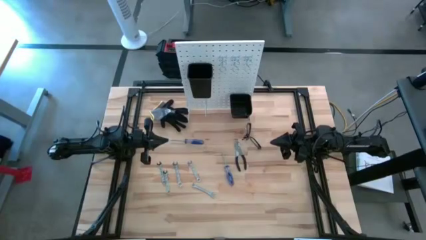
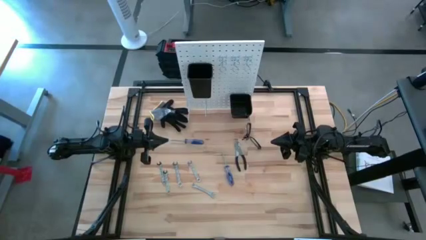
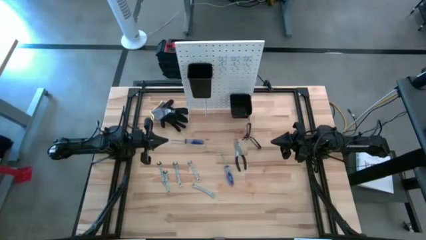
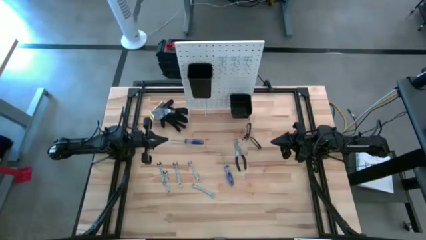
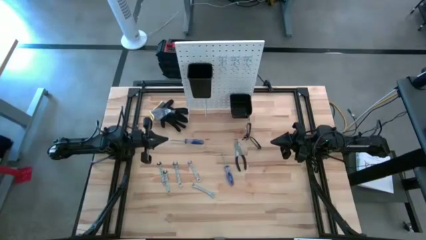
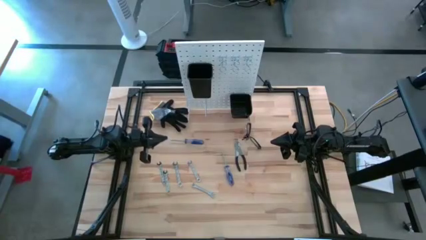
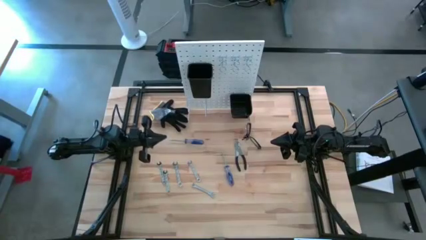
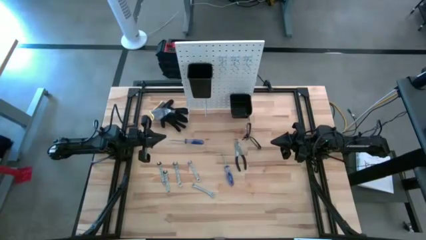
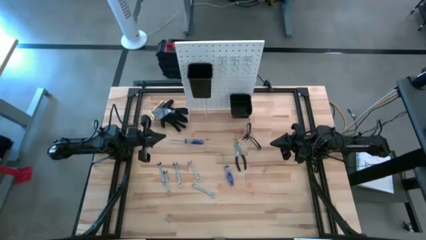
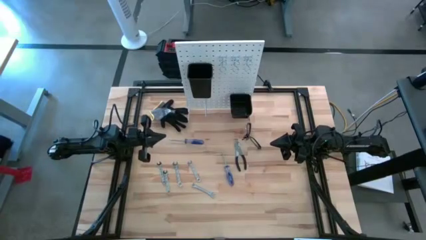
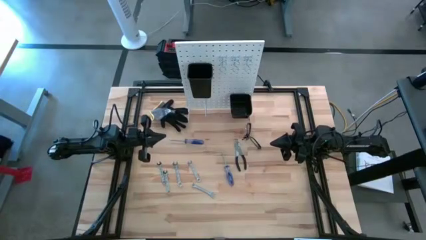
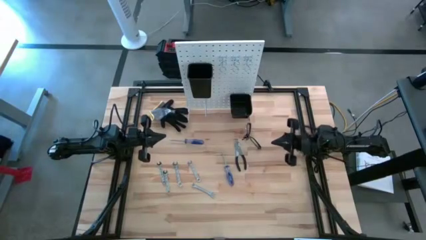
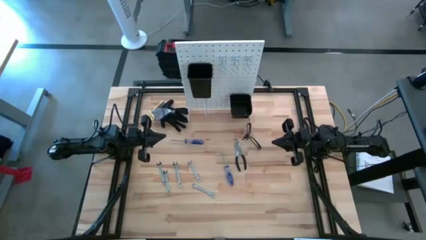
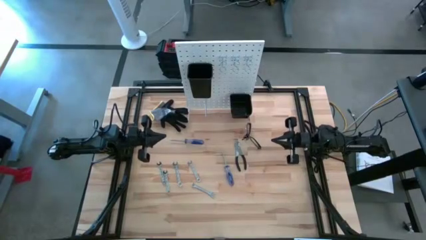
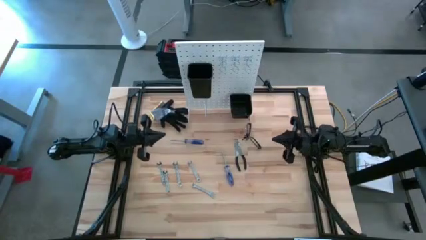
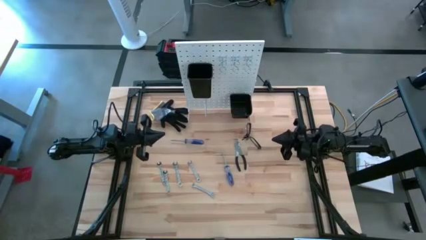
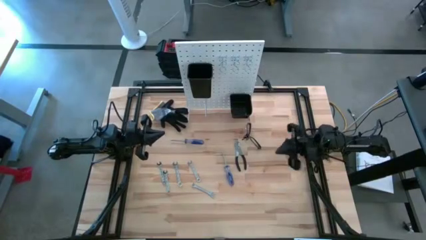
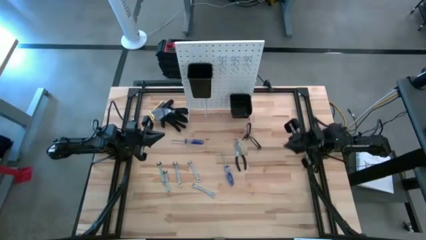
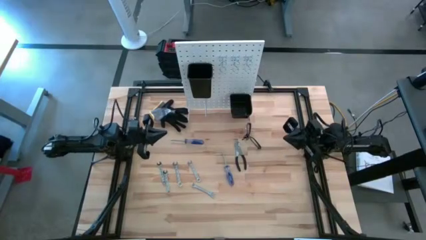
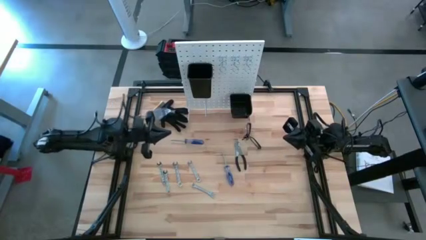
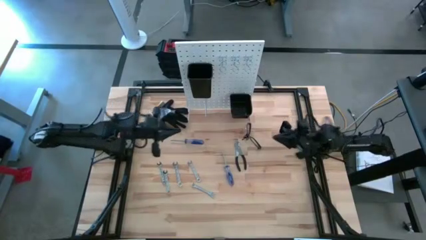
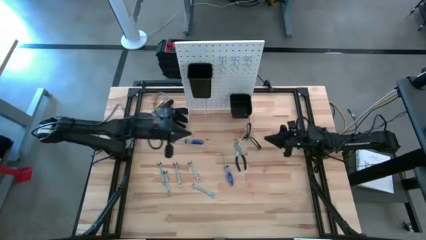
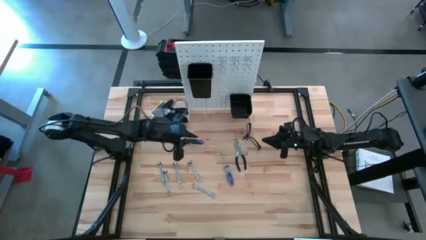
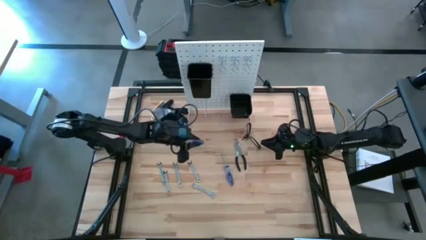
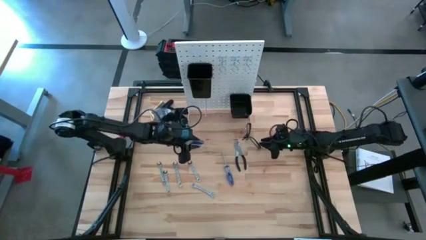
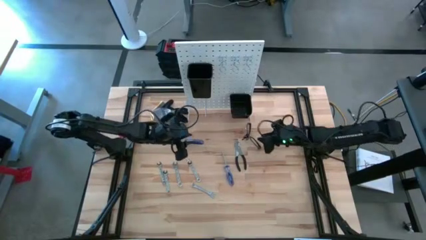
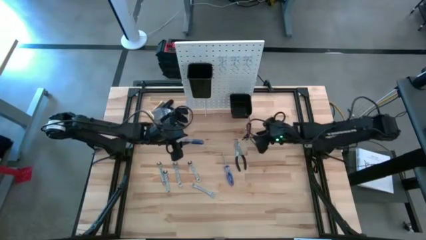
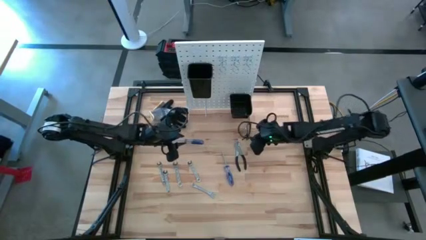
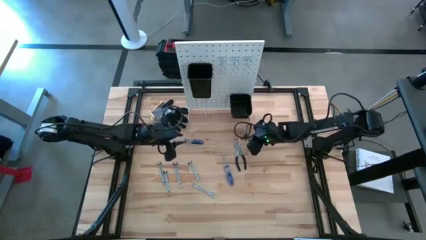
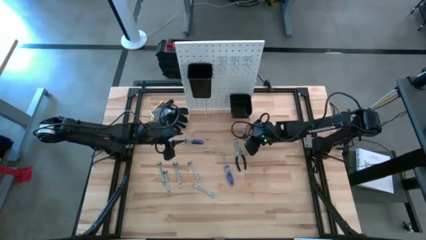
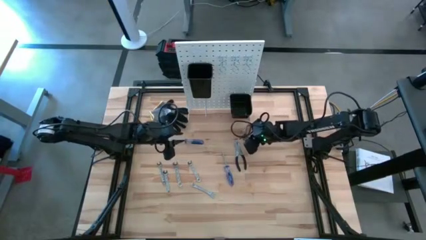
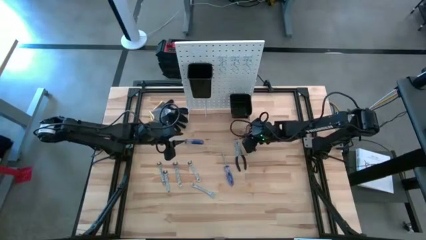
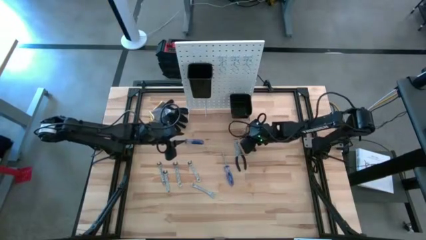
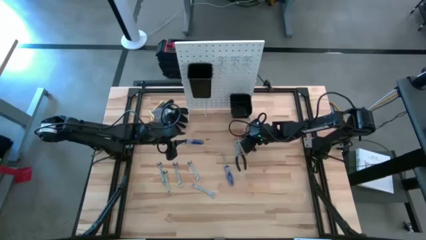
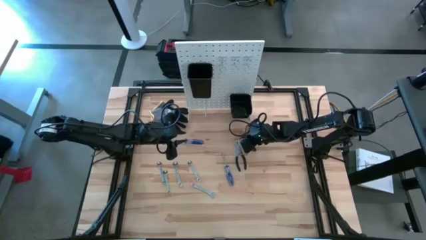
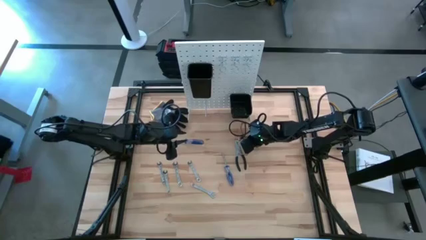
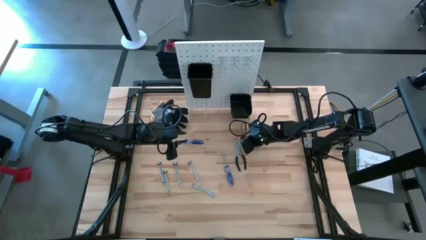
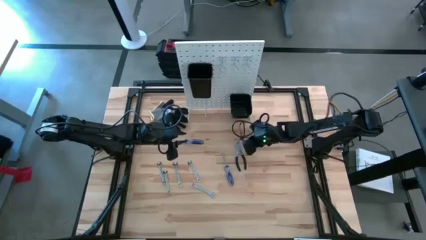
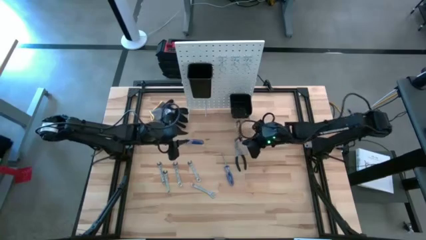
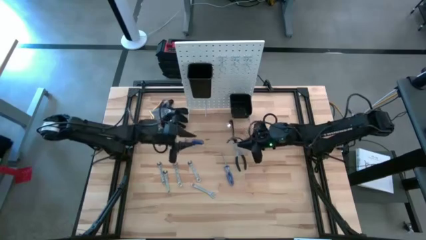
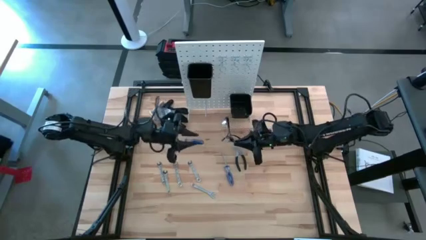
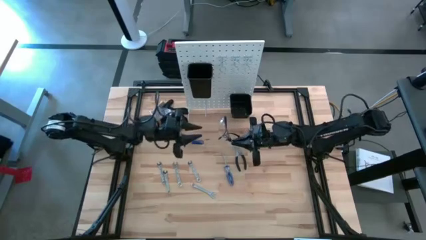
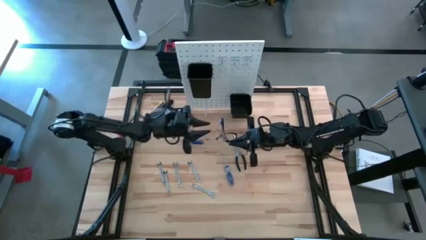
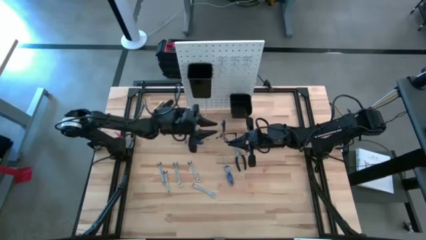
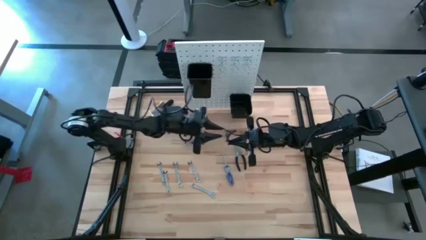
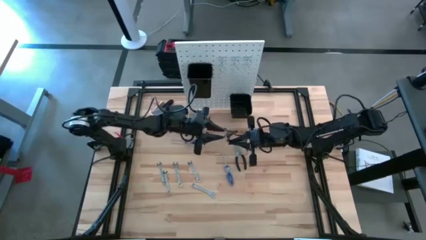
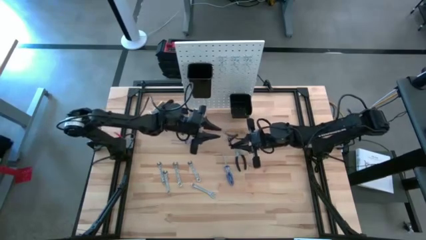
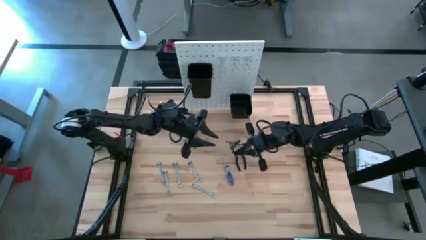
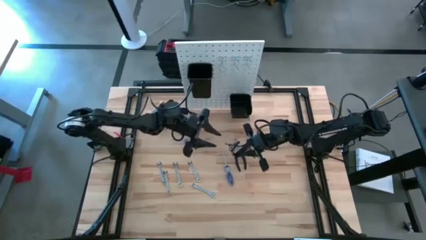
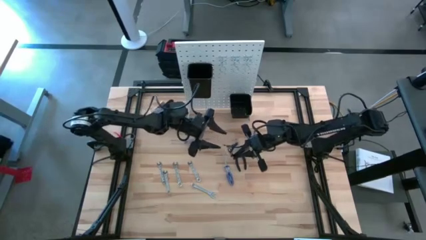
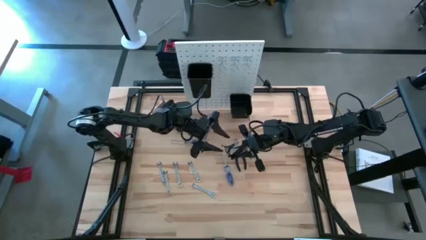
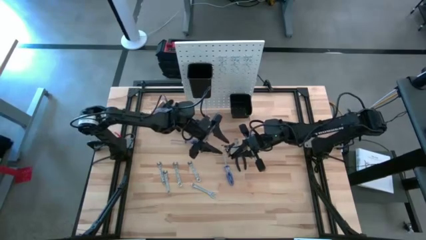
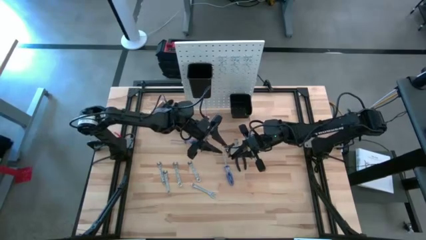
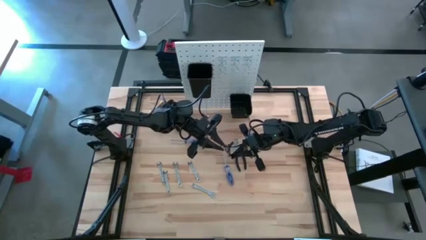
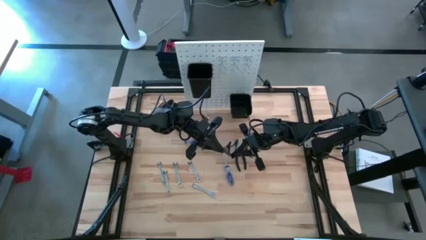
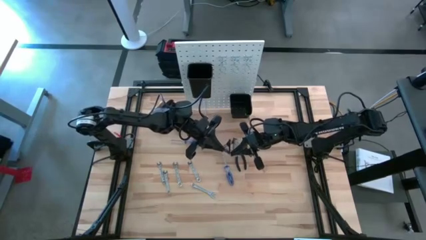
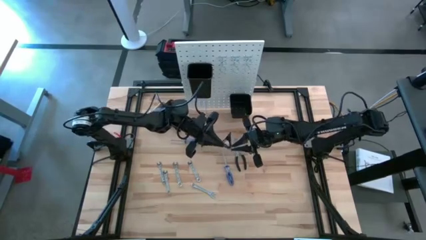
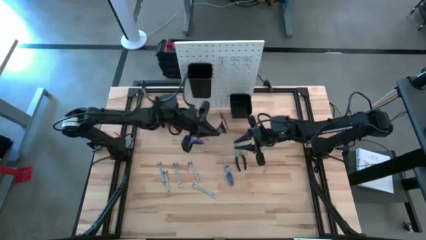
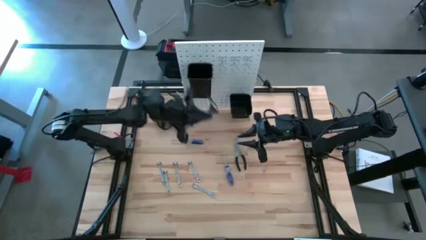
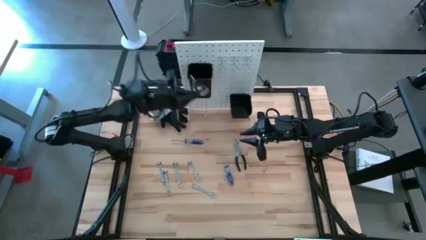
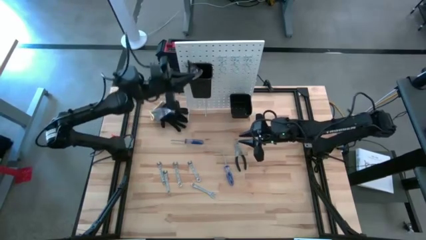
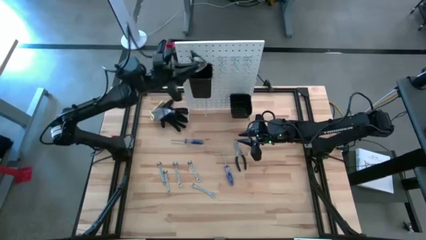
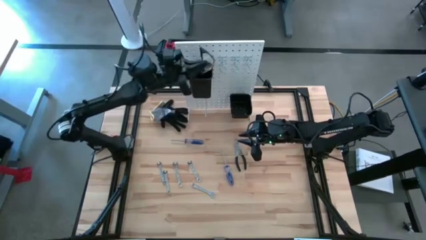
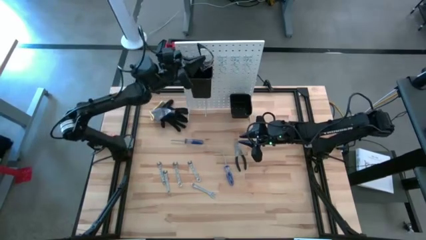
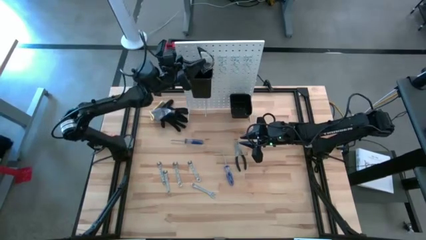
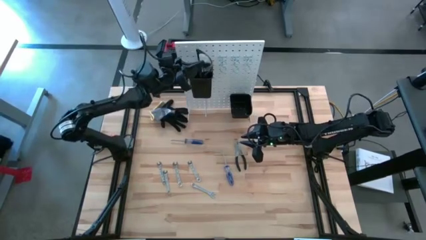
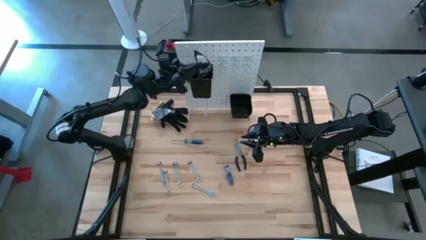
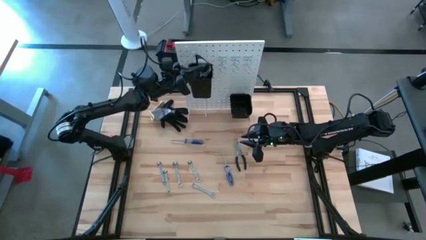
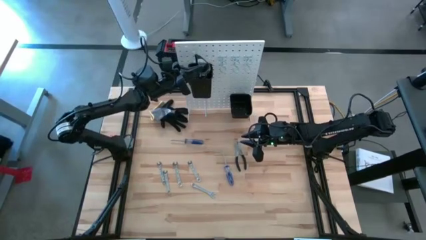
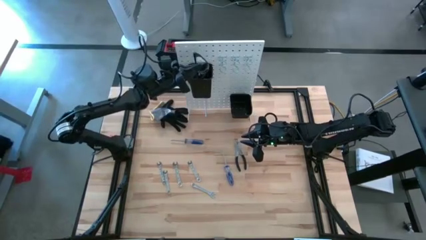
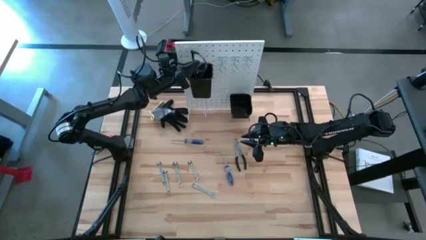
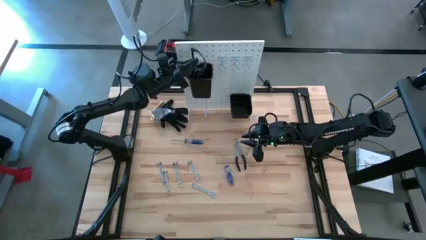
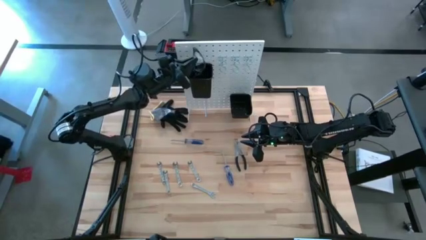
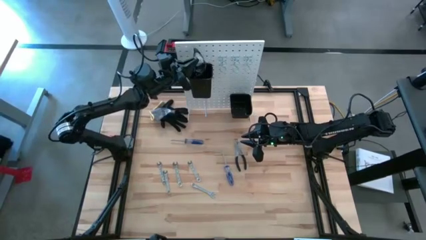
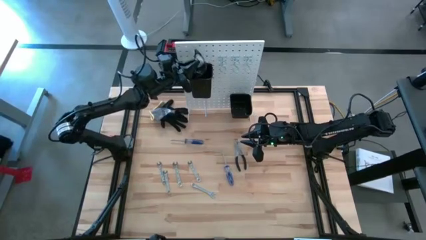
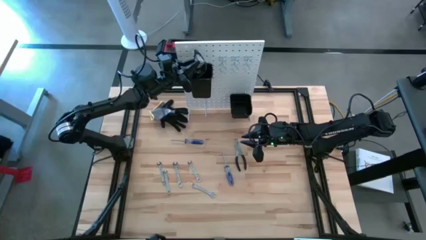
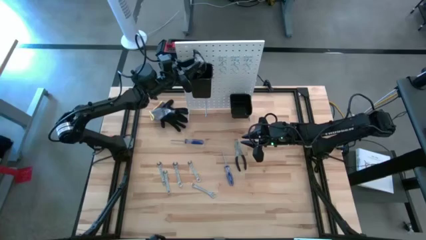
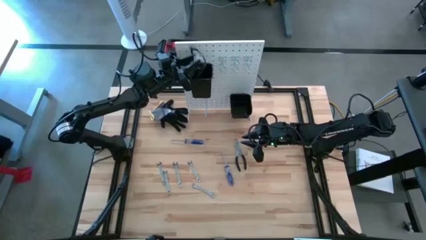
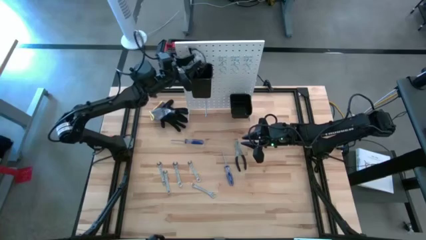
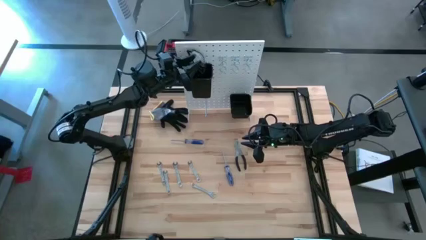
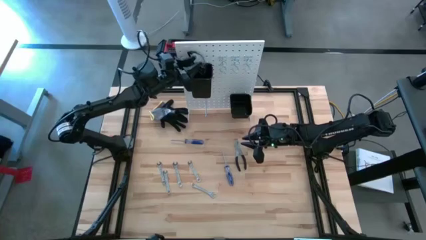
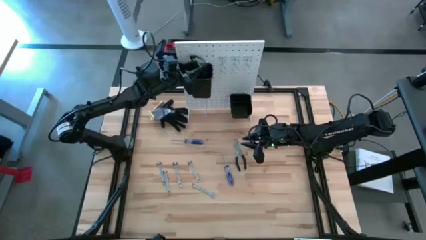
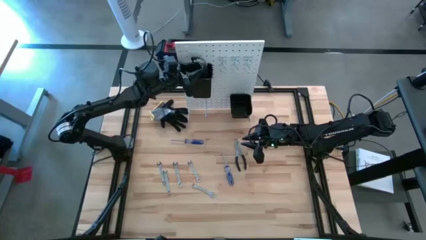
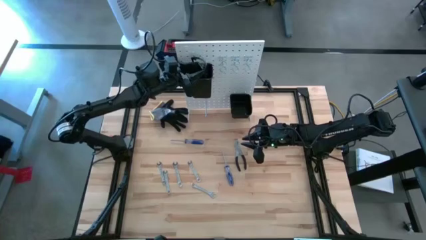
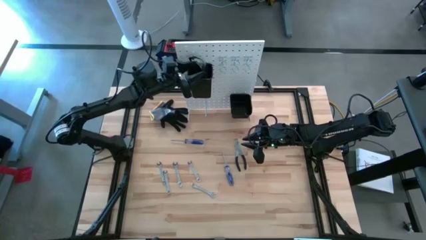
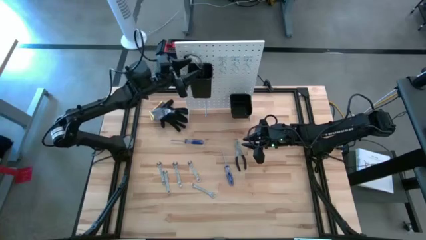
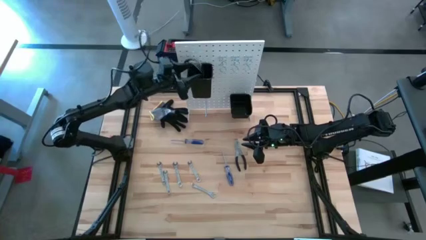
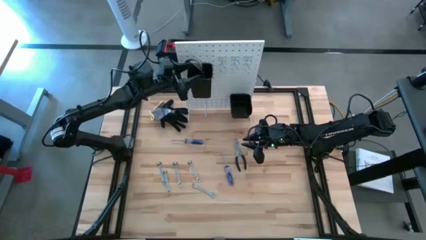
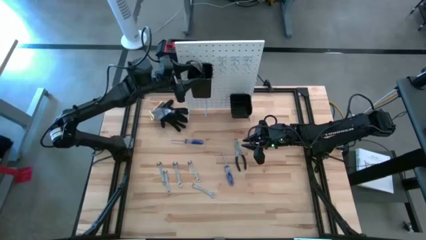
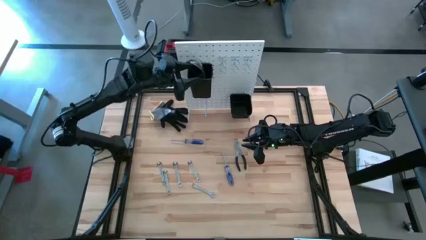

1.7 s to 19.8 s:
Task: Hang tools onto peg board
Put the black safety glass into the top black bin on the peg board
